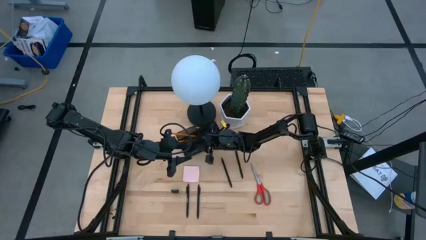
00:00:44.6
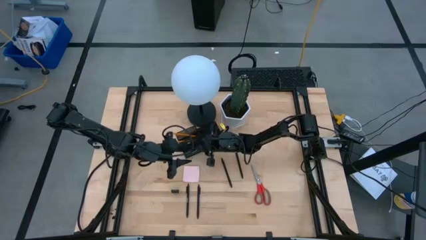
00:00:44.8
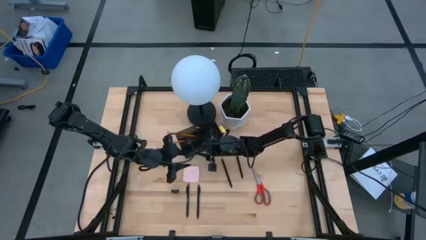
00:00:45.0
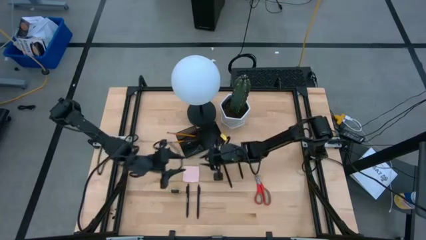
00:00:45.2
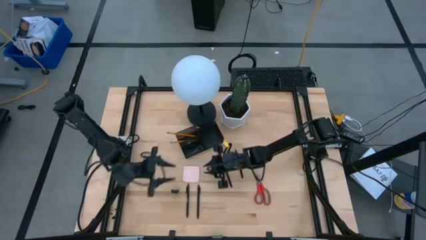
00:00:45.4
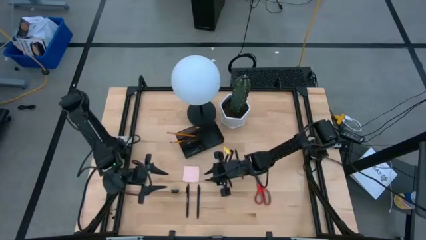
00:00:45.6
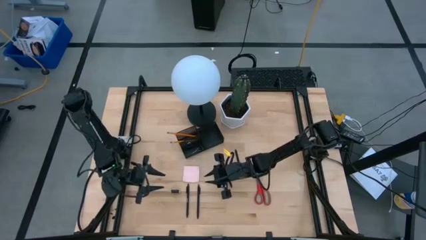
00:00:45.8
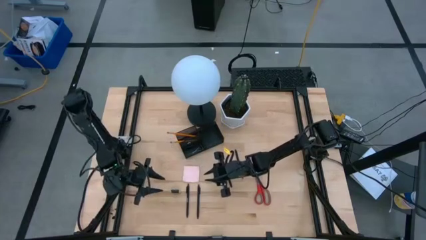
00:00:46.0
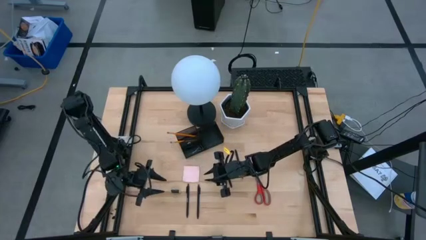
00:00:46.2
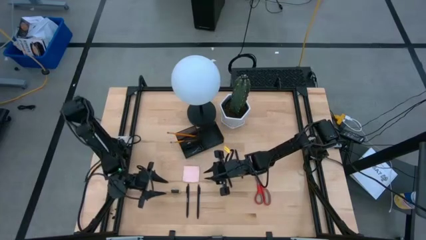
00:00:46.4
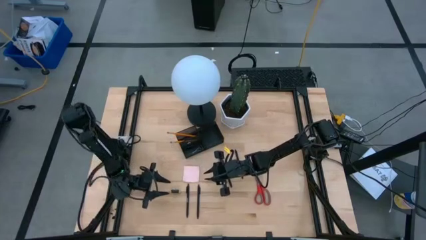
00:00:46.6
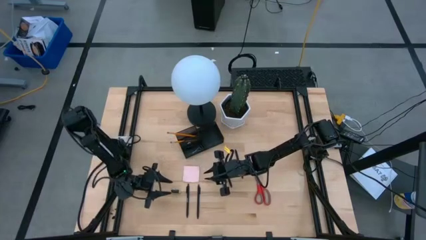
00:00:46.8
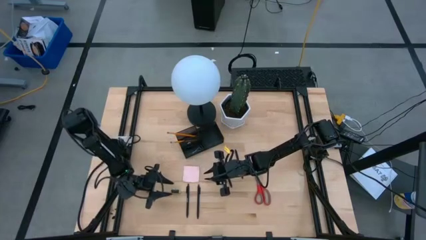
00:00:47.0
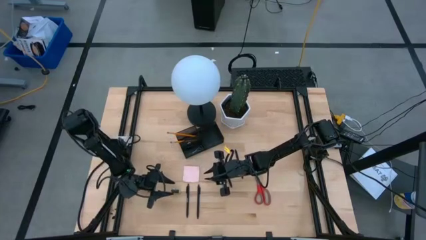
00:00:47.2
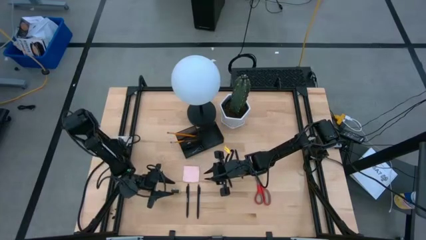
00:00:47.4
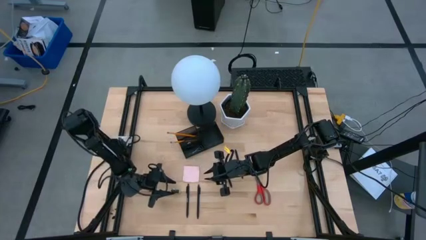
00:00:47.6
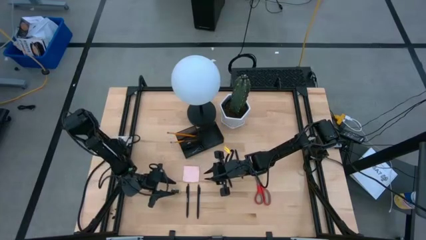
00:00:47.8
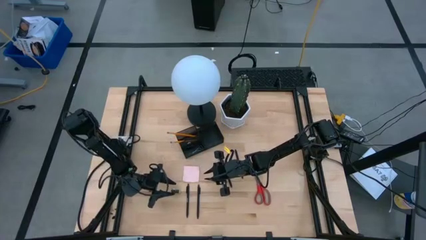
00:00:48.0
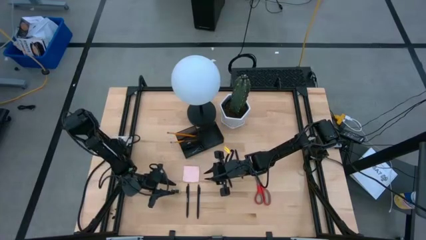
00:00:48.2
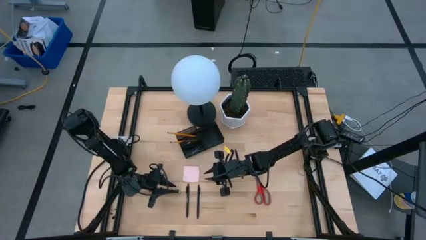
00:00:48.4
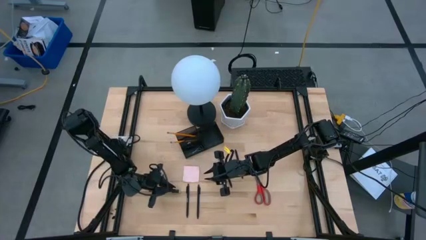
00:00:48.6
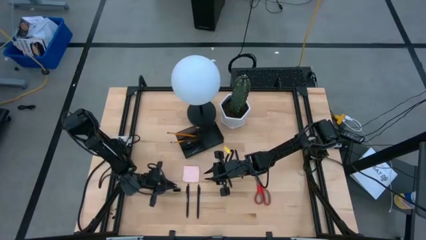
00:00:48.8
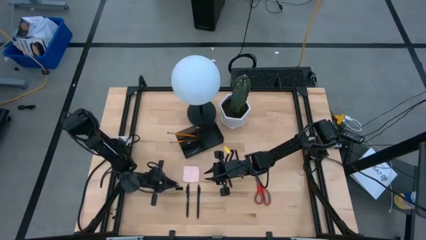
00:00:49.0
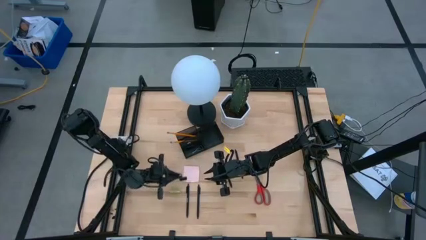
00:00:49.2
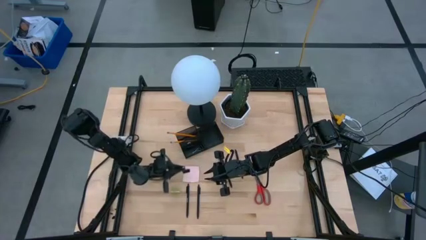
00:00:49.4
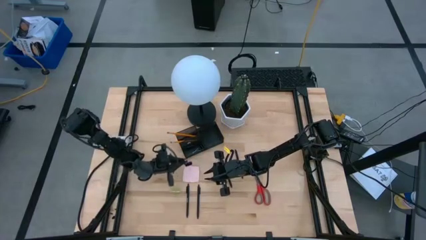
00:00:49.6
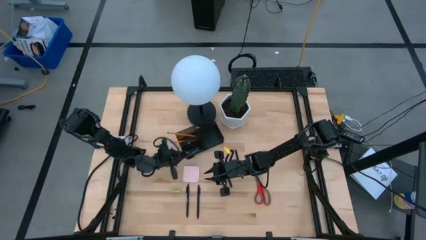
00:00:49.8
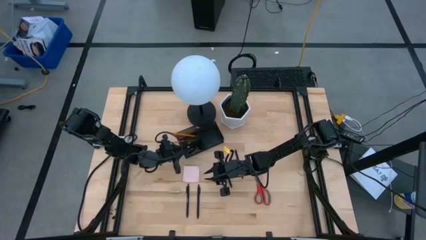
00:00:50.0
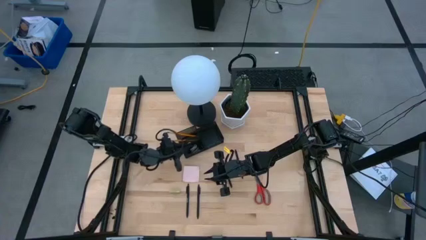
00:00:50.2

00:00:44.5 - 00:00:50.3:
Task: Pick and place office supplies into organizer
Put the black binder clip into the desk organizer

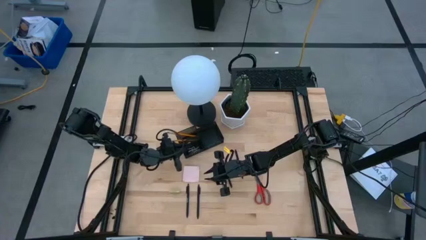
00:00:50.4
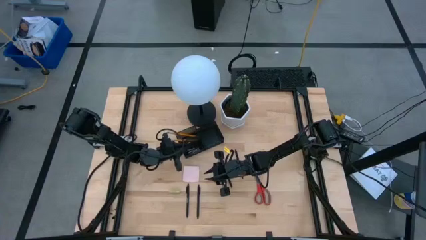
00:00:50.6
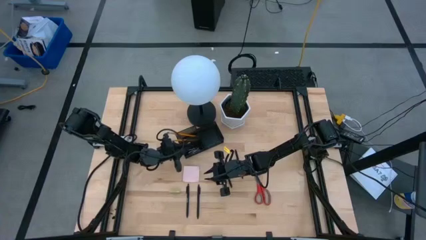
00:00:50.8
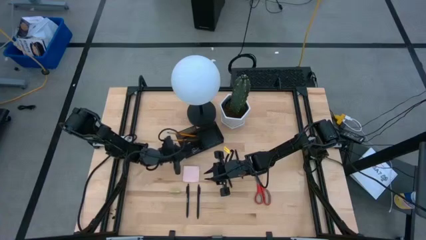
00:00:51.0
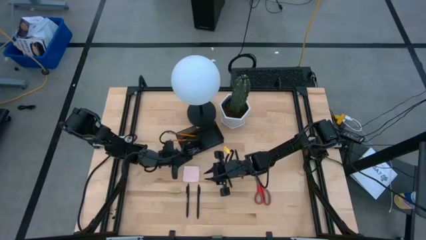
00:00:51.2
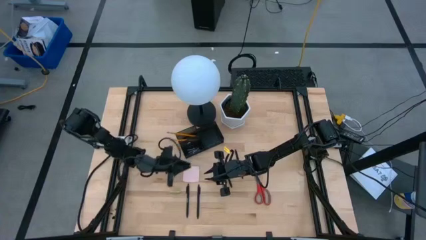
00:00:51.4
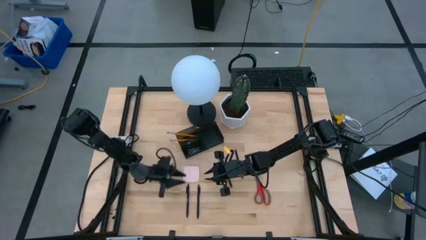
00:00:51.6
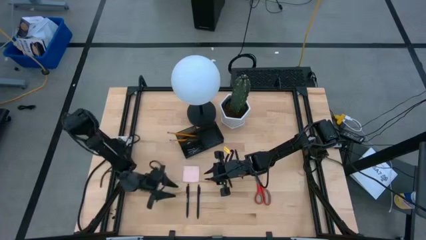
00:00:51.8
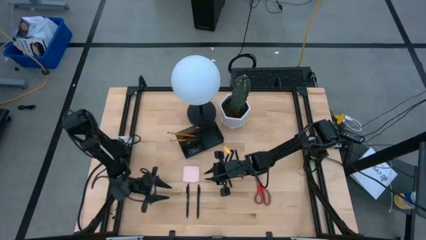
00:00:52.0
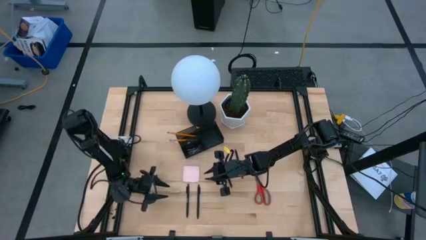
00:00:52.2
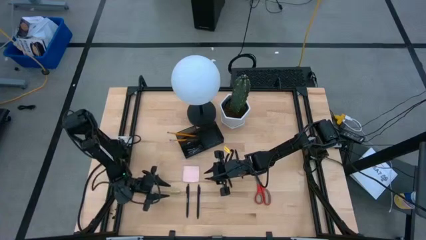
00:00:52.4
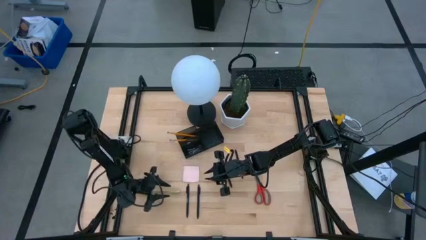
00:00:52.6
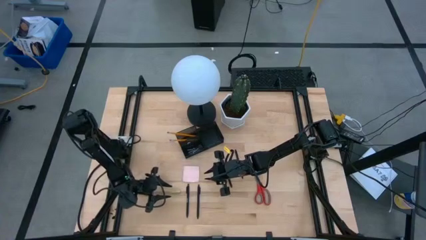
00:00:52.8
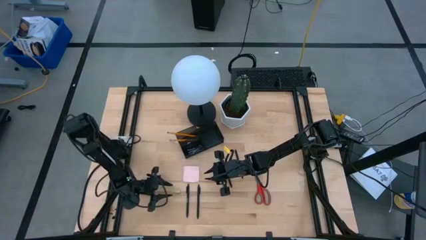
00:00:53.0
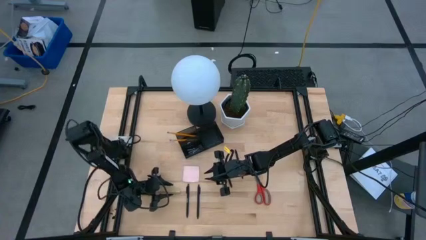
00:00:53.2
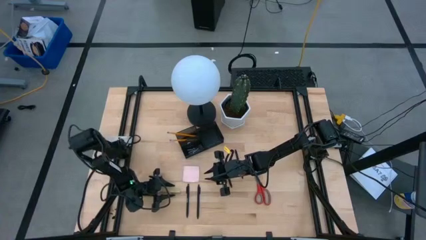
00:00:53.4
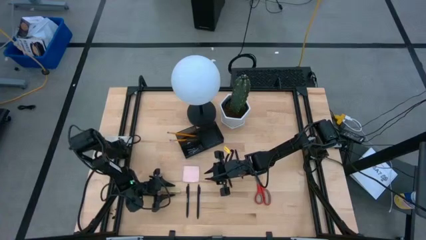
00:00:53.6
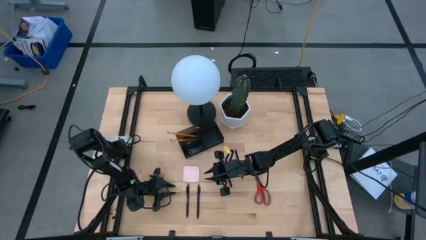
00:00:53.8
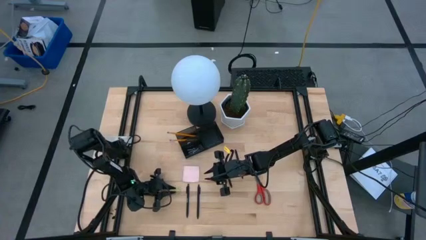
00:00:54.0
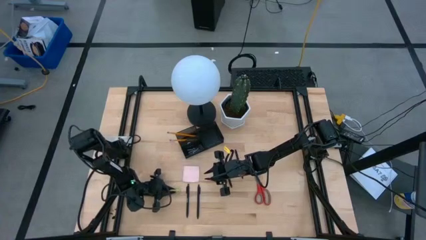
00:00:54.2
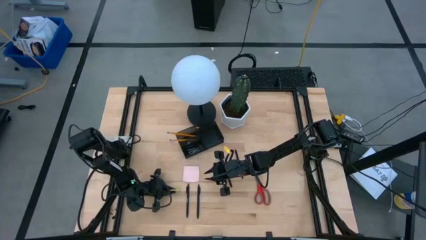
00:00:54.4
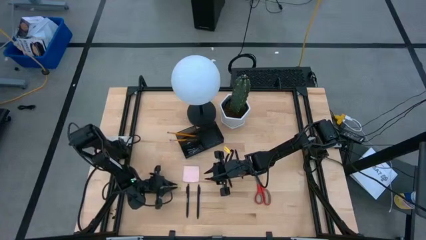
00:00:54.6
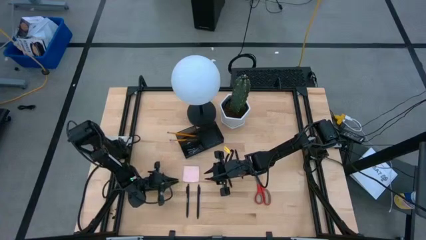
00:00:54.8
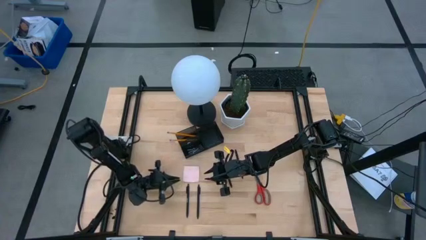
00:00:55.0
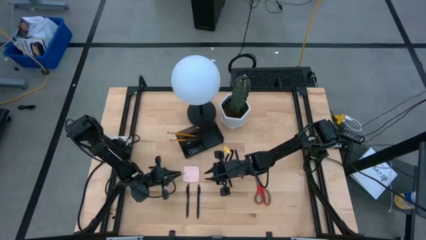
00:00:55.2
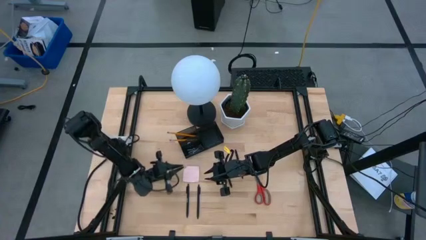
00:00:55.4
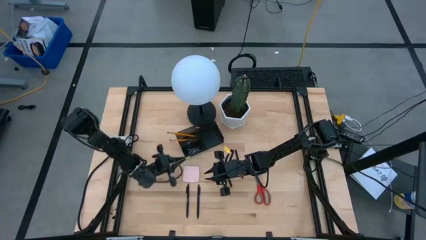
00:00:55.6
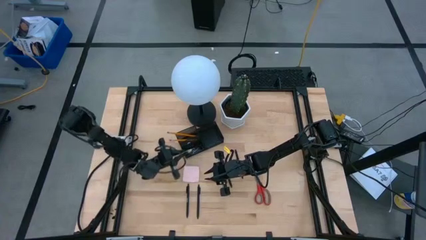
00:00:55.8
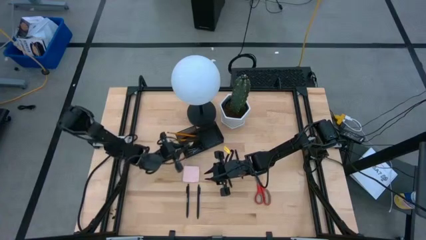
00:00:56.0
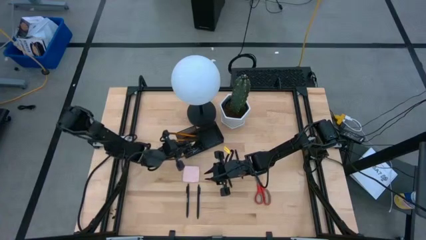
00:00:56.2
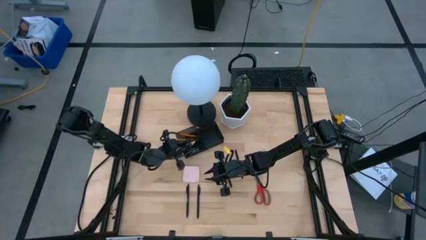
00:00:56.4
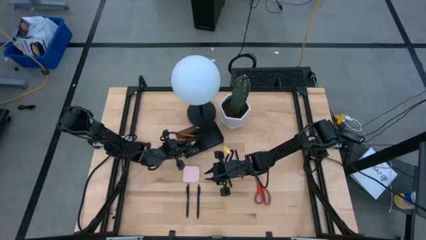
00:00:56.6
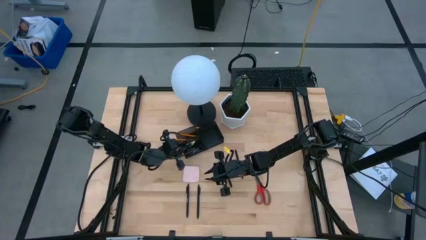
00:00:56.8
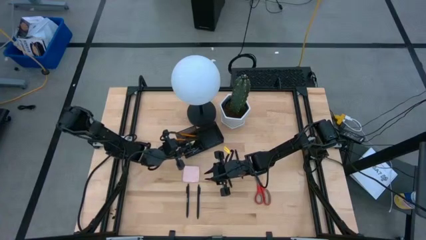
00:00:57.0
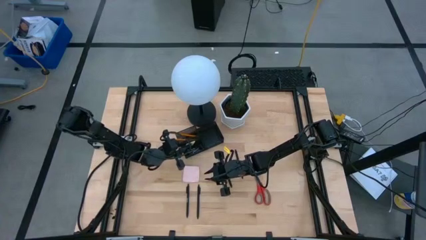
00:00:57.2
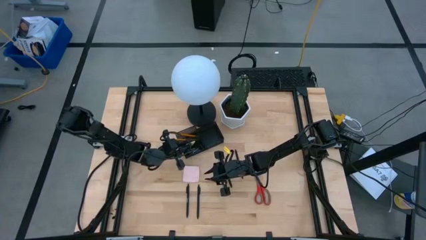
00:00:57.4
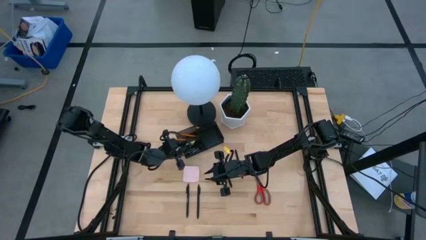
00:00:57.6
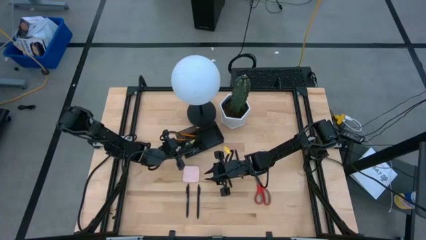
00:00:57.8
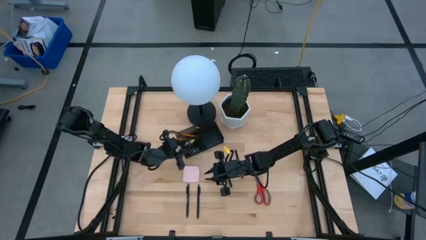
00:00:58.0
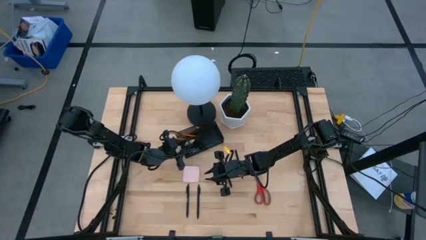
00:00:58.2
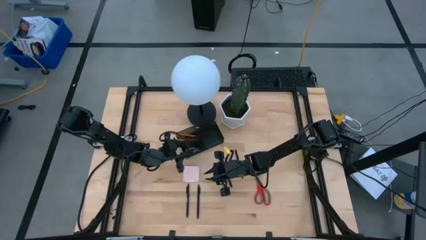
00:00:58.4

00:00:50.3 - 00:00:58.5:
Put the yellow eraser into the desk organizer

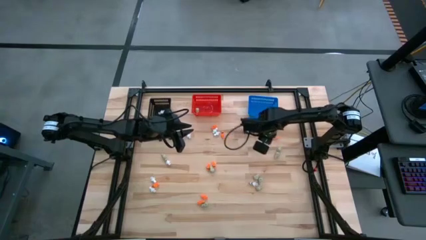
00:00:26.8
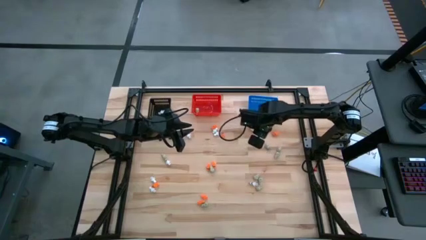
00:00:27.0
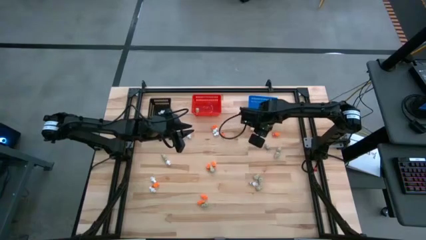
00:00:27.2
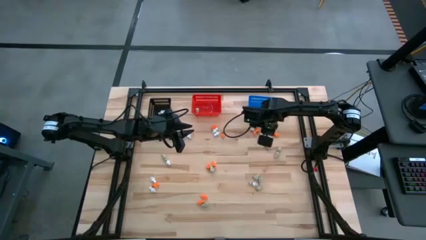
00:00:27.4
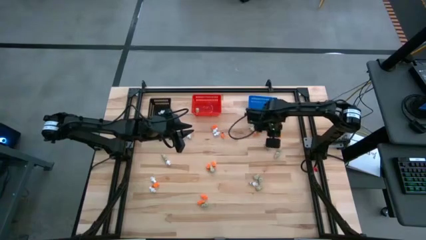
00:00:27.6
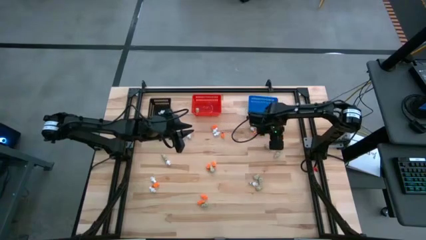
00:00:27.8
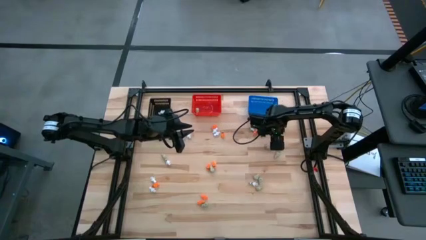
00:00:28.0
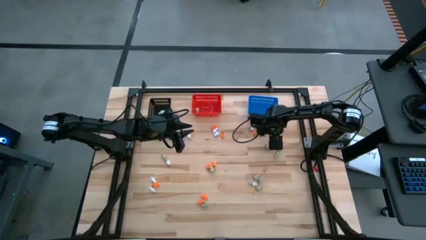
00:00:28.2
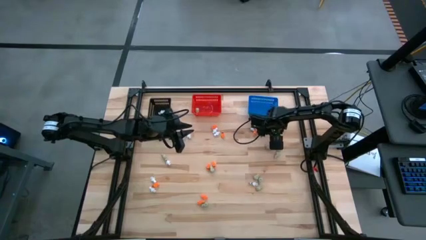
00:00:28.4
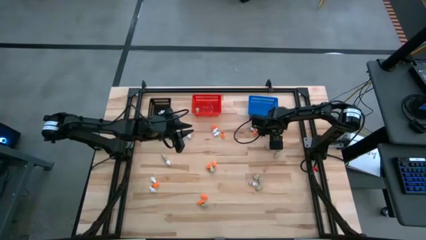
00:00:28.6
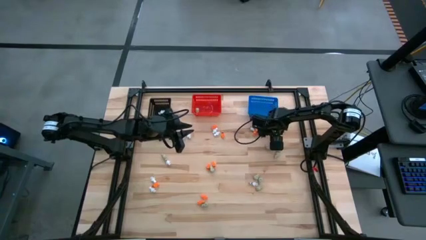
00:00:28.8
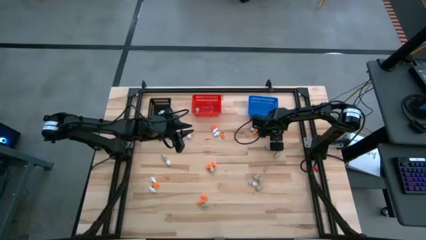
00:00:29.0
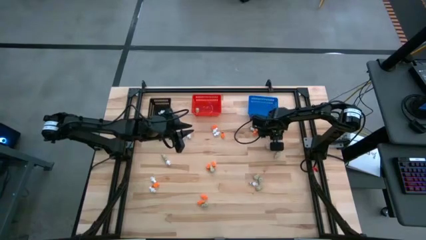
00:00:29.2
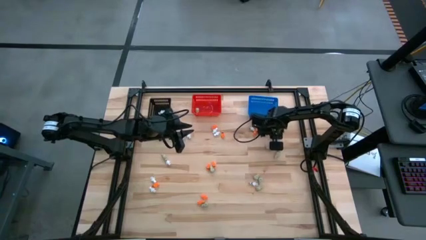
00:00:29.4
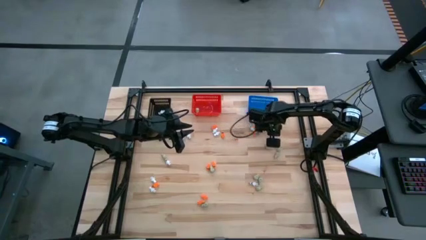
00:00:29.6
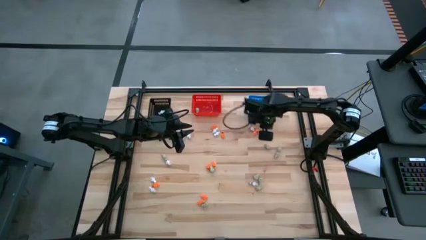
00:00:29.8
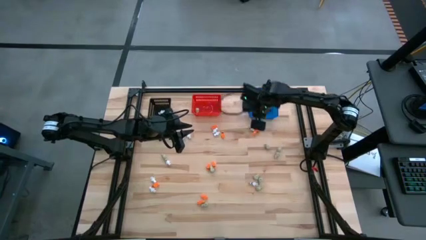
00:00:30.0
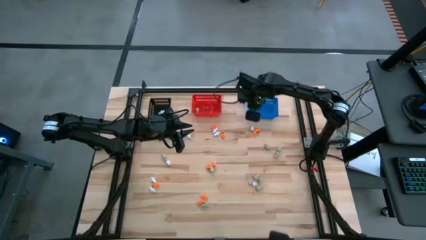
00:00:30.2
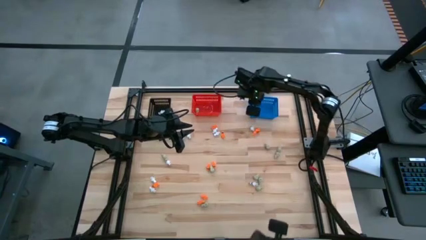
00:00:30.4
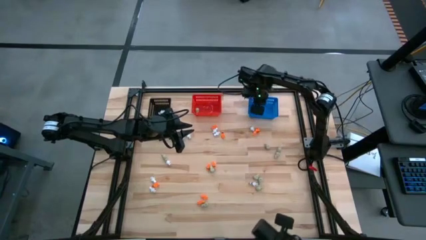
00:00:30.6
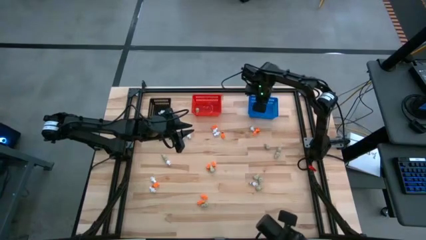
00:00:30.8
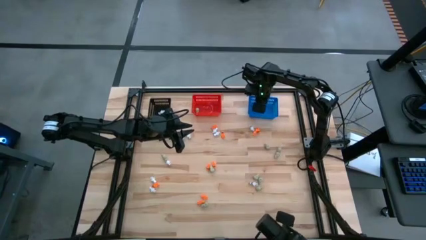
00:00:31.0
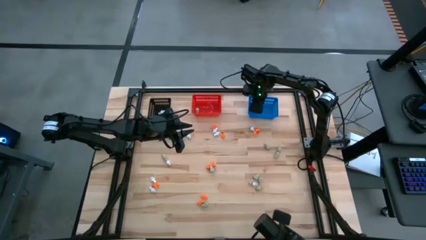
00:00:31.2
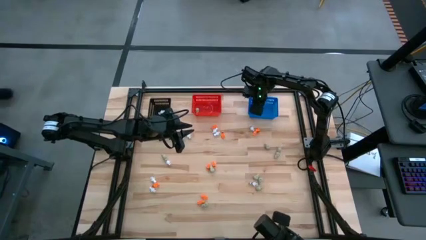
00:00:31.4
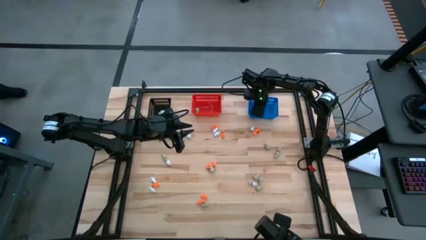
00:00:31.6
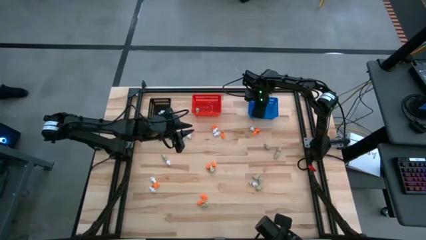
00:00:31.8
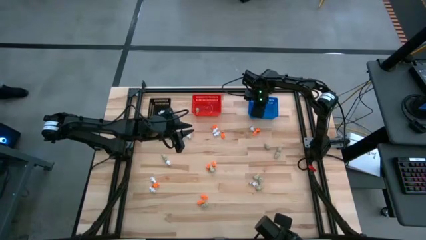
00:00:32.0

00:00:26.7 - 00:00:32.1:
Task: Sort Halloween decoration
Put the orange skeleton toy into the blue bin
